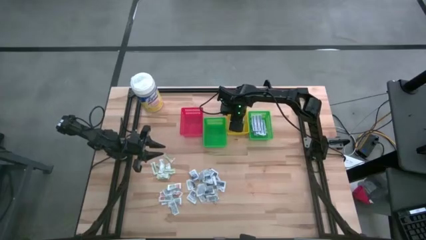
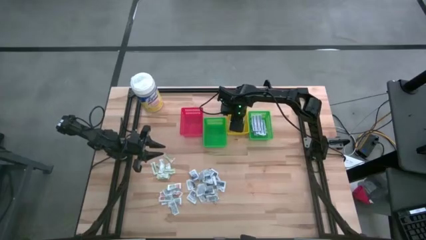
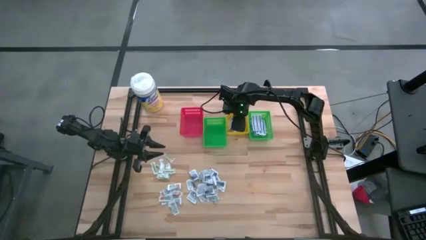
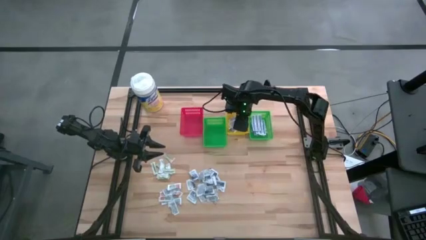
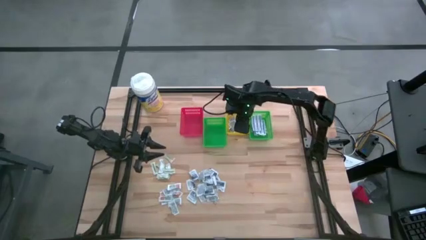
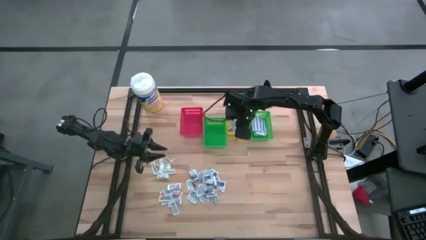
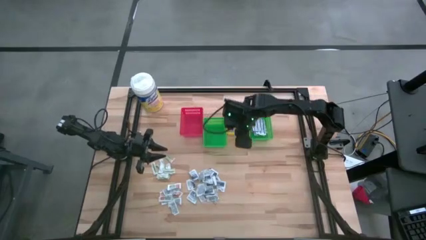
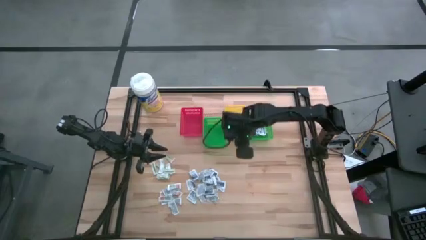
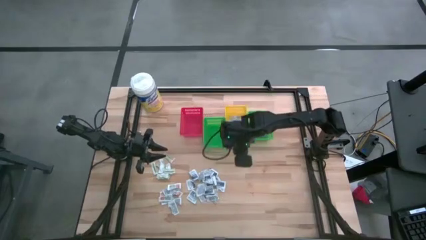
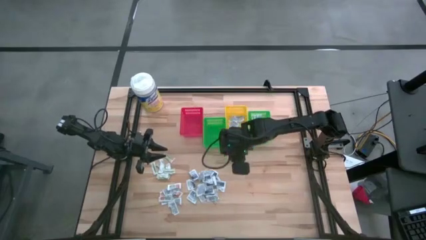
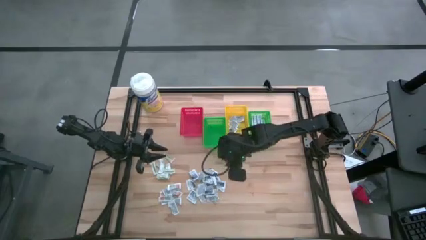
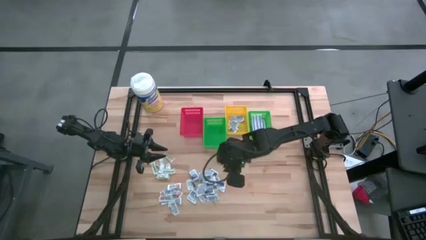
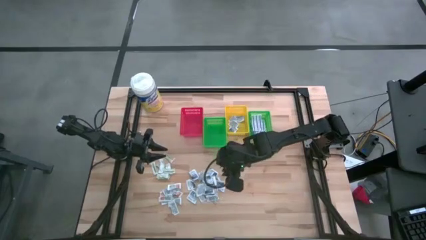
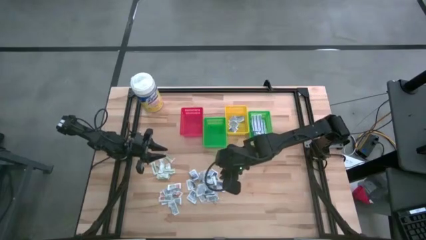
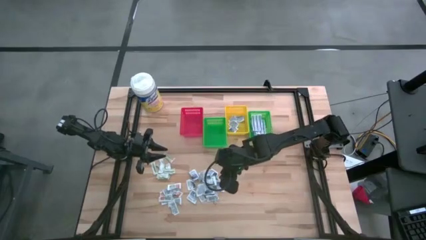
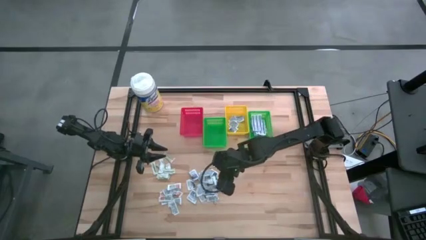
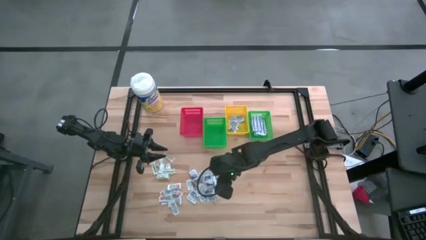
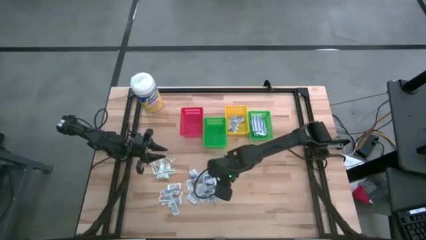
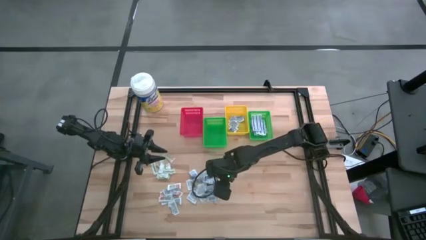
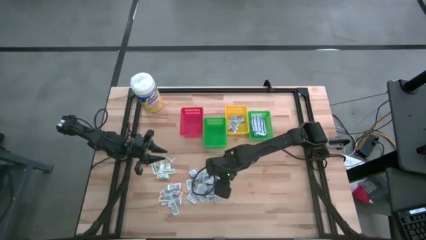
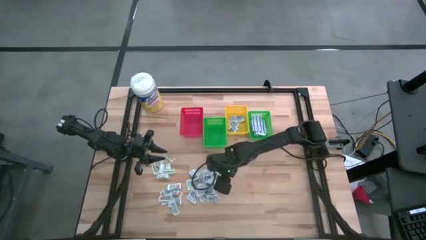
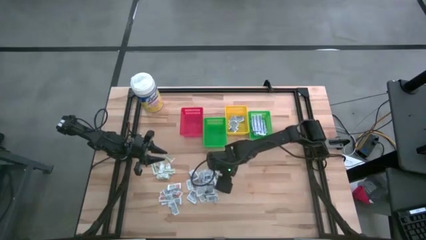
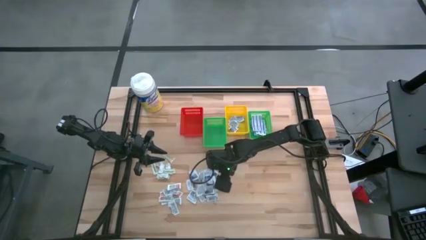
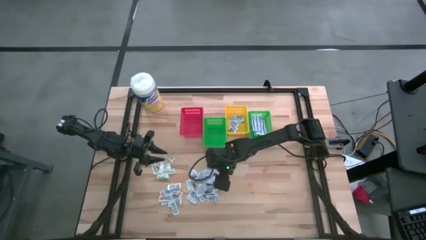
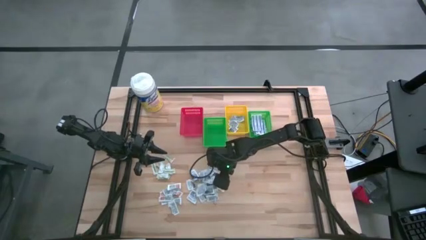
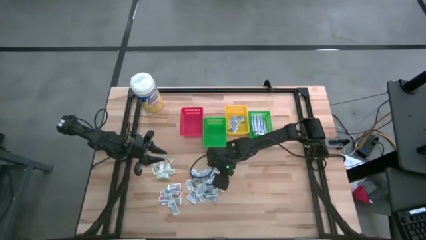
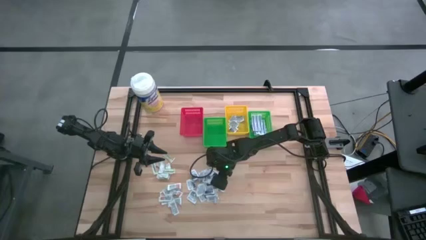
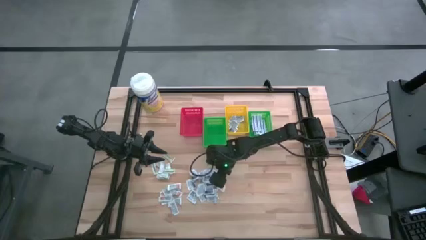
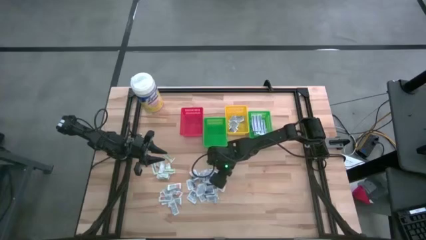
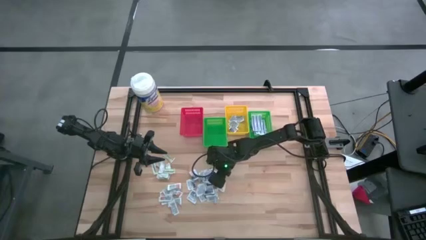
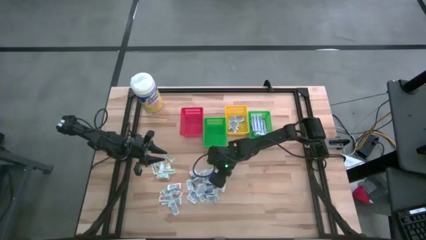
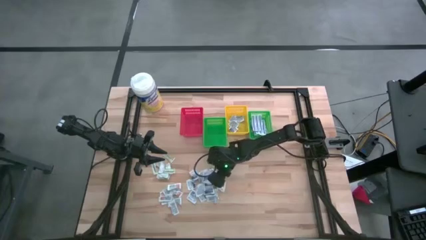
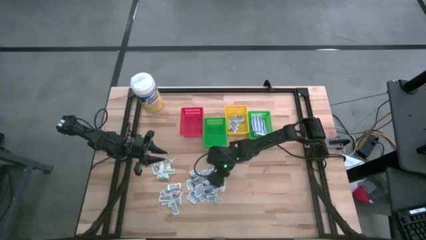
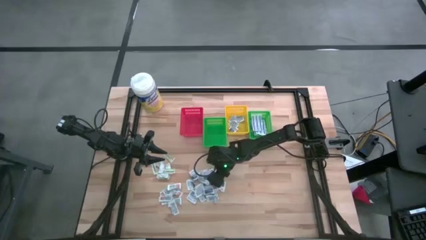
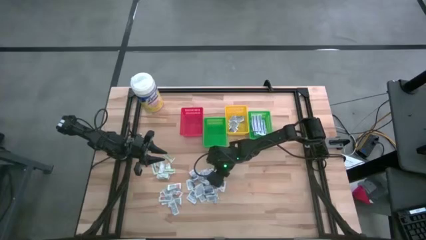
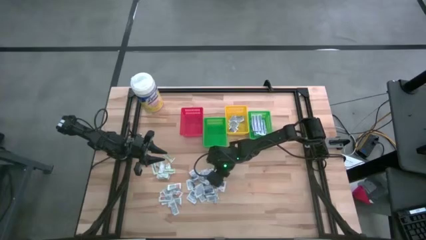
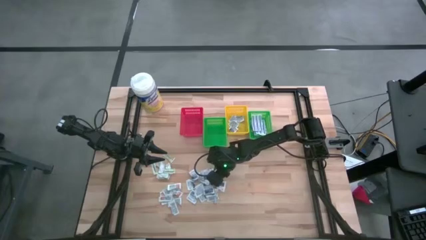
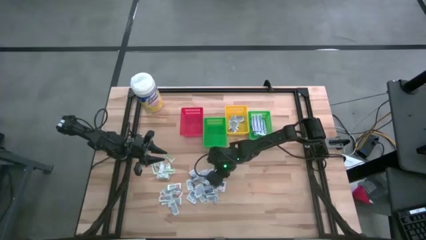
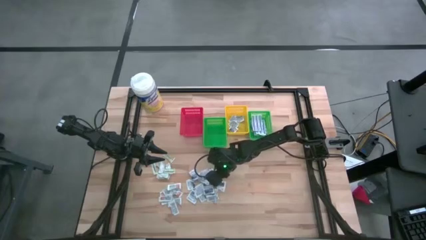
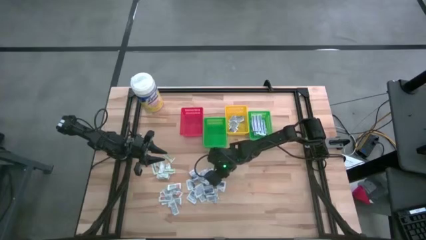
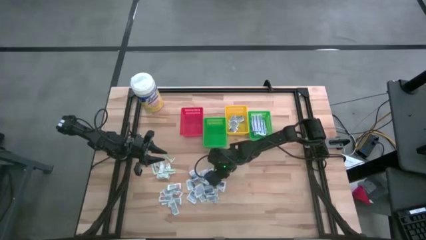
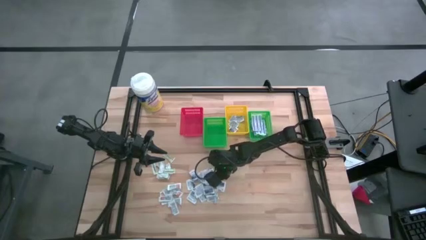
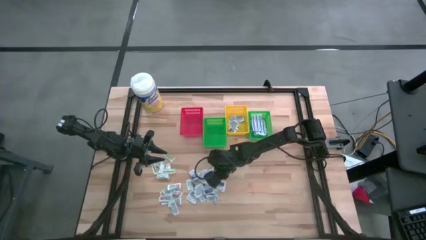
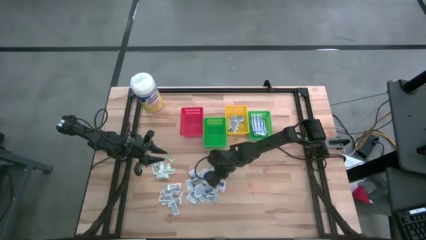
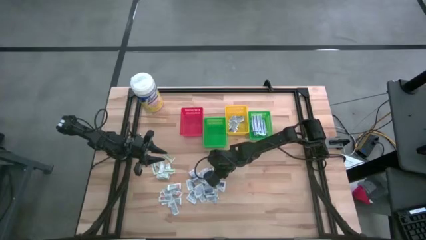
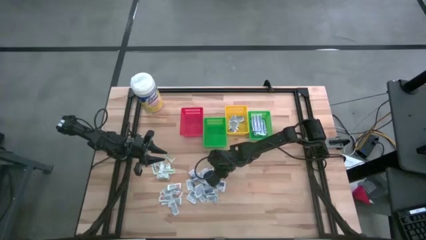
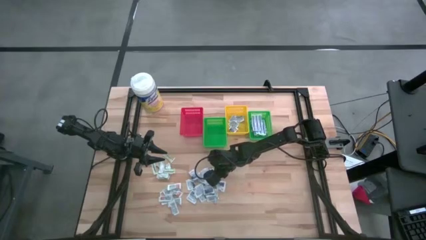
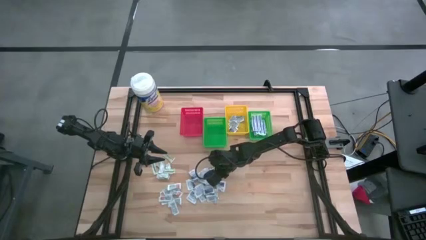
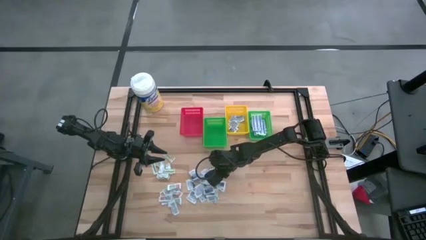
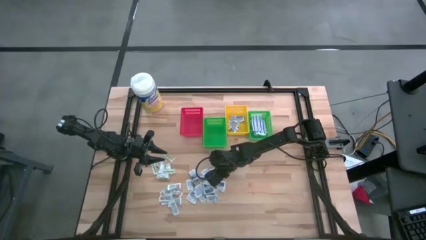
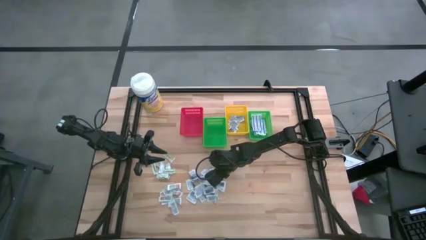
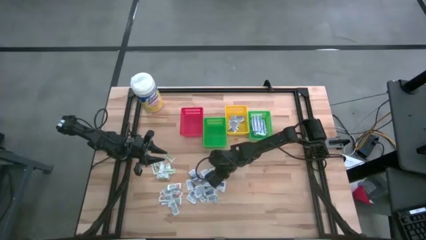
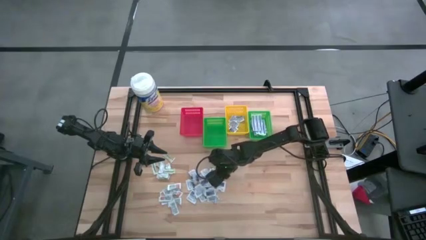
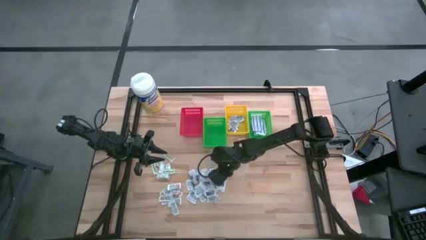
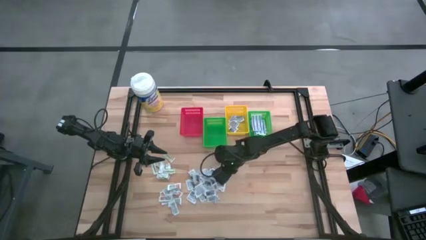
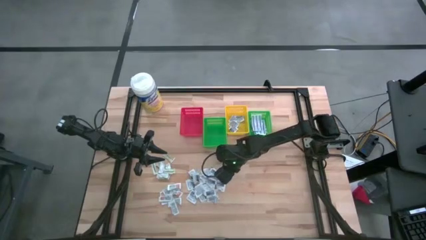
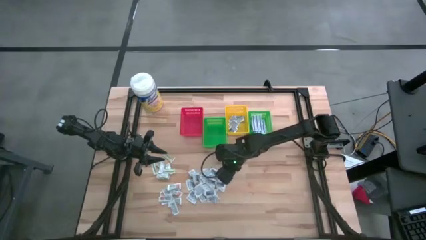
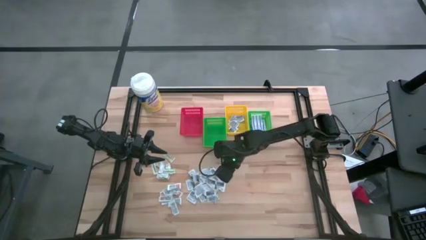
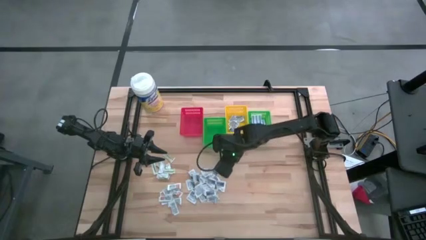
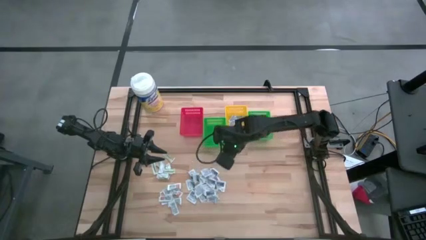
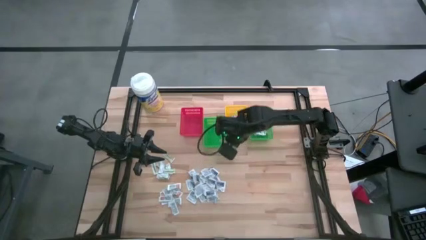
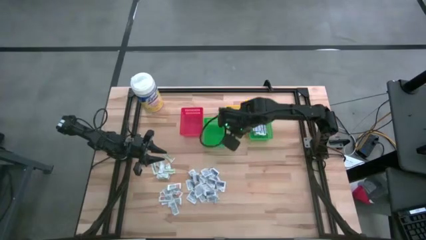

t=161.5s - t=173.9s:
Task: Pick & Place First Aid Supplies
Put the alcohol pad into the yellow basket

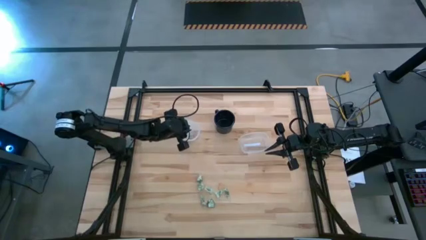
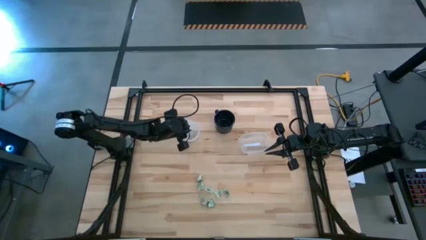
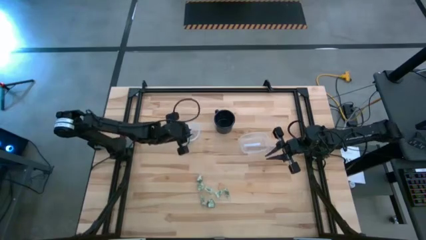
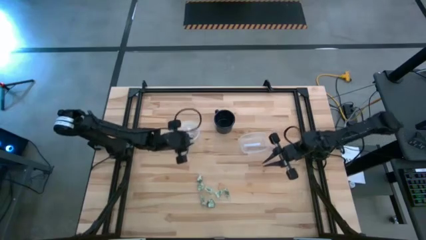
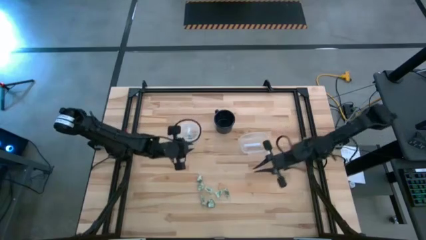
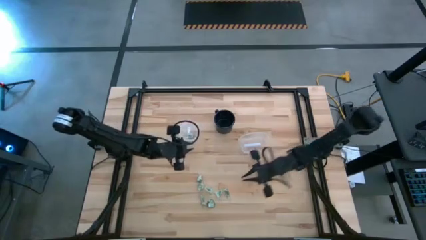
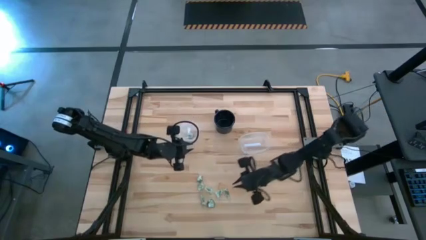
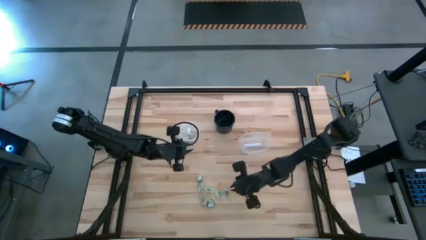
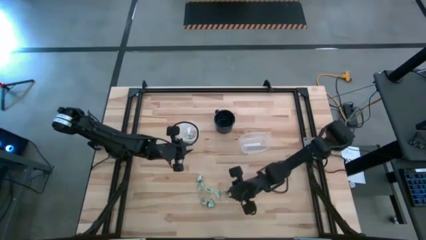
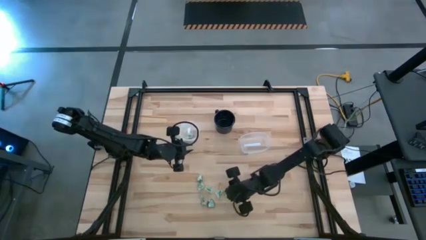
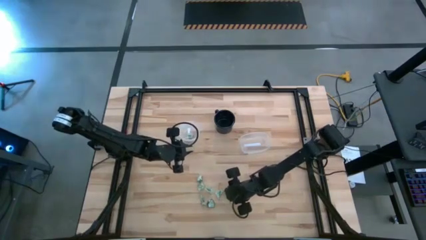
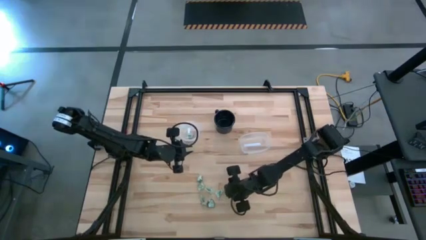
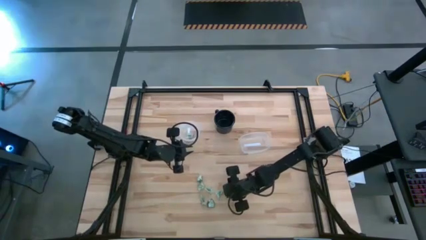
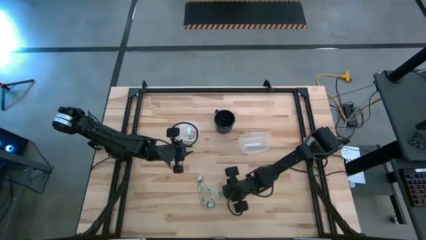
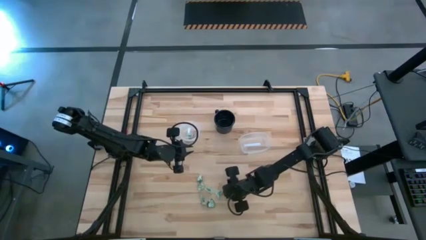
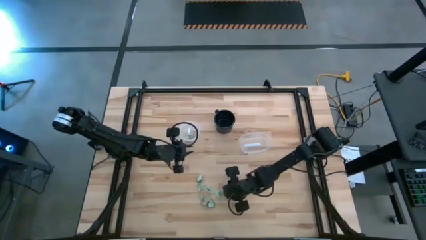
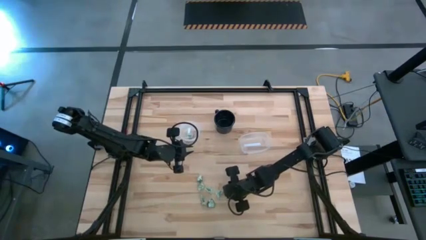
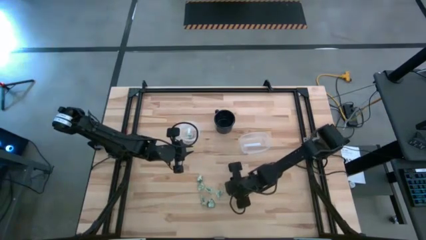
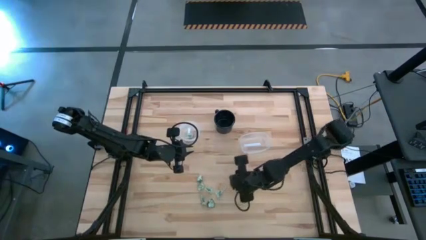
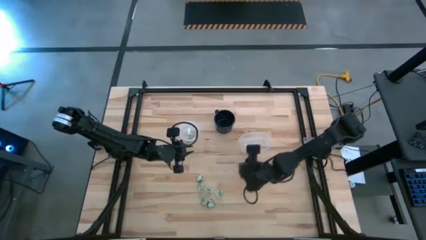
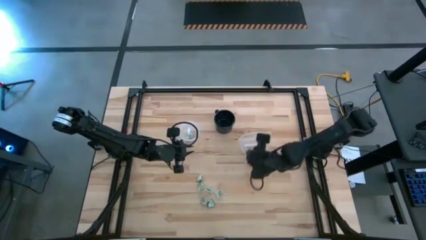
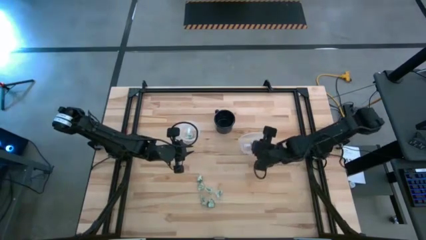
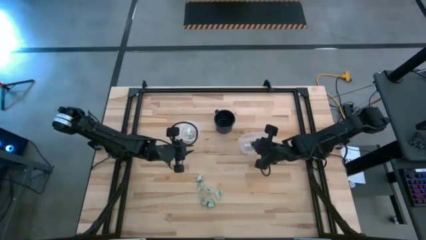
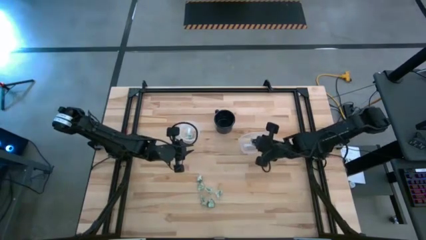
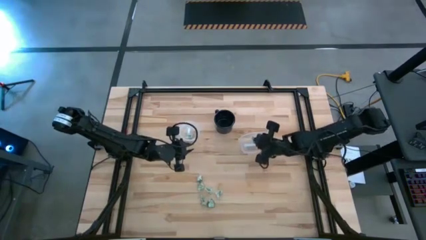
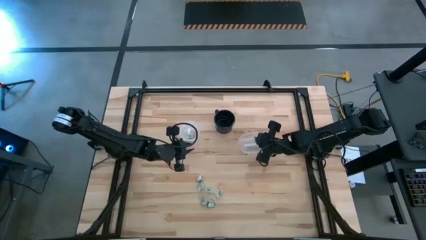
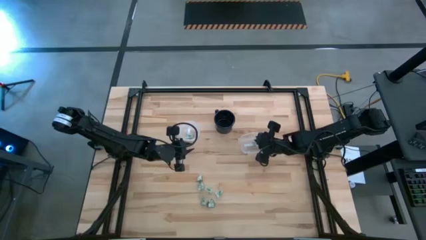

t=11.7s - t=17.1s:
Task: Pick and place items into bin
Put the stevia packet into the right transparent bin
